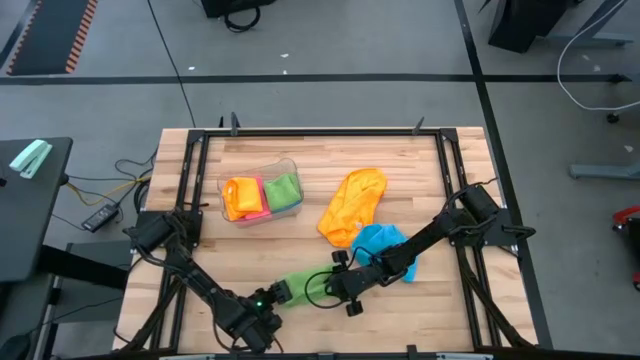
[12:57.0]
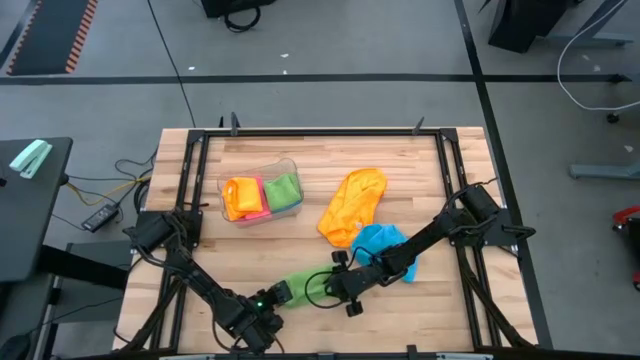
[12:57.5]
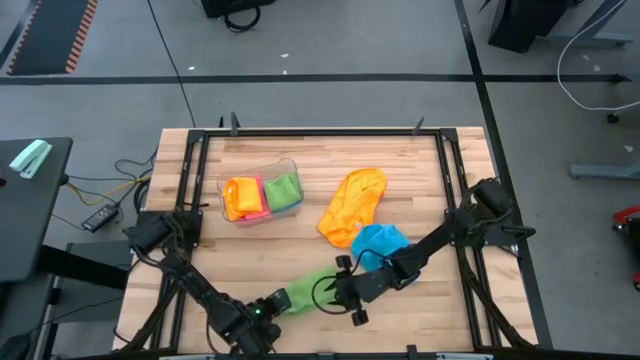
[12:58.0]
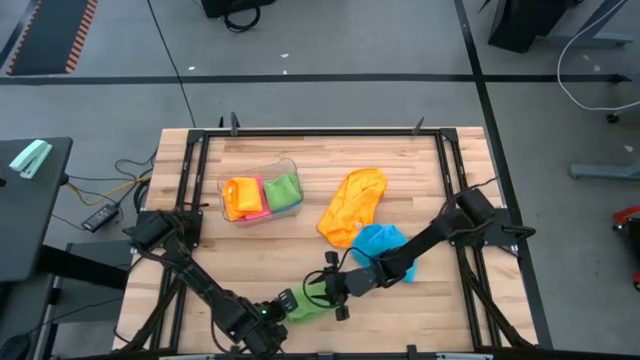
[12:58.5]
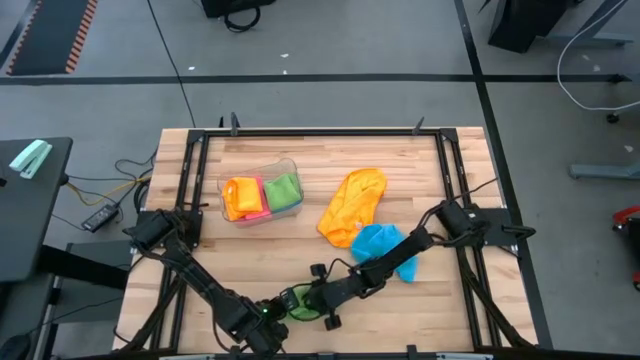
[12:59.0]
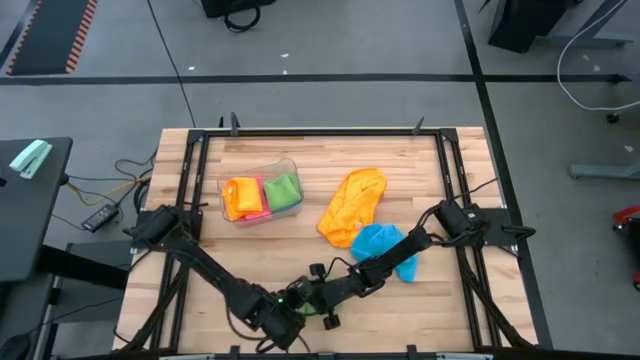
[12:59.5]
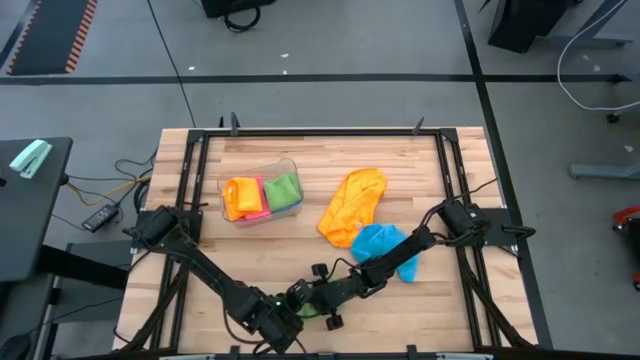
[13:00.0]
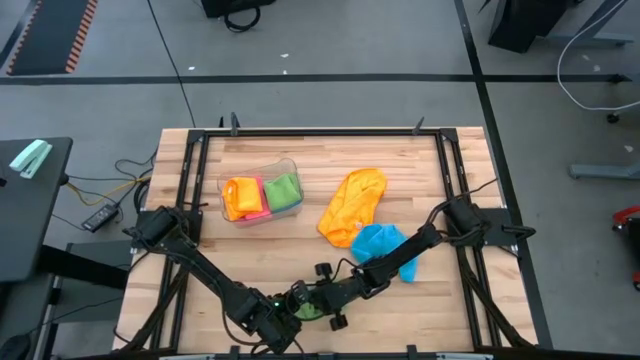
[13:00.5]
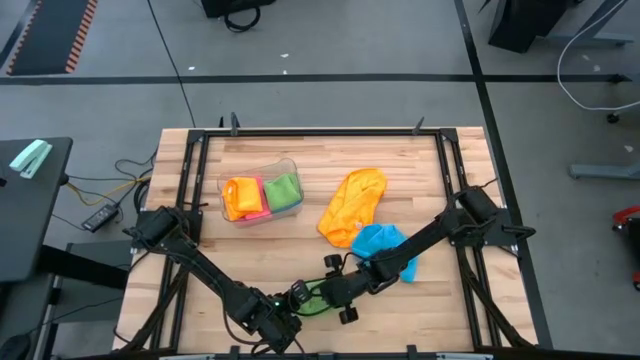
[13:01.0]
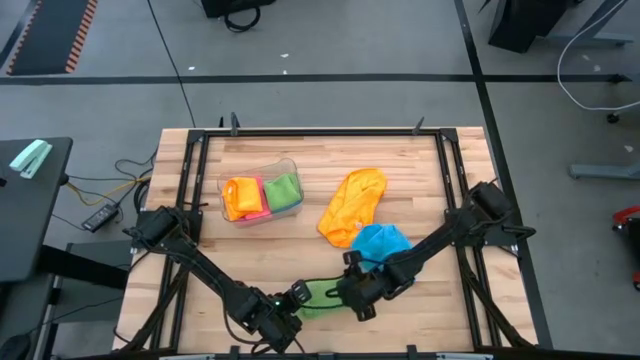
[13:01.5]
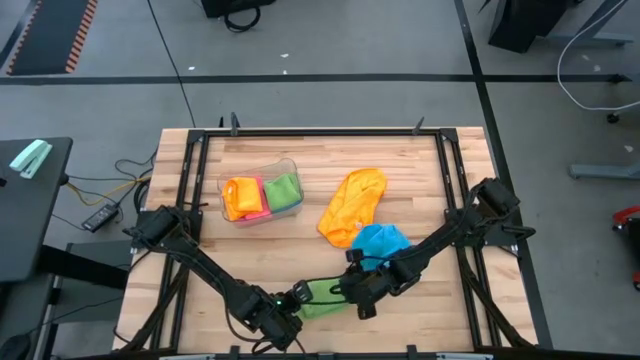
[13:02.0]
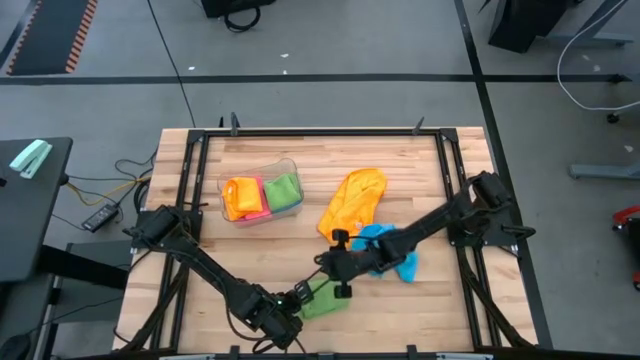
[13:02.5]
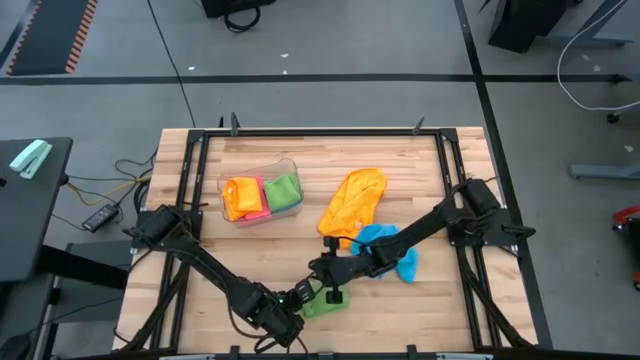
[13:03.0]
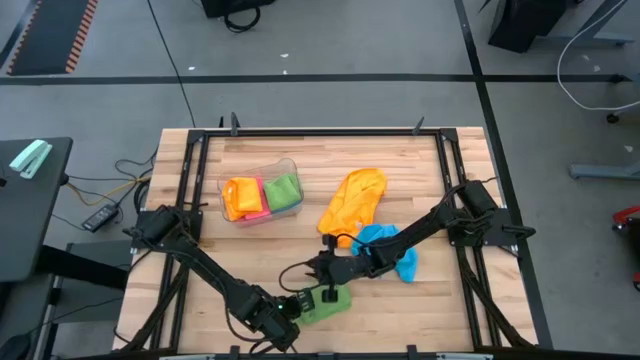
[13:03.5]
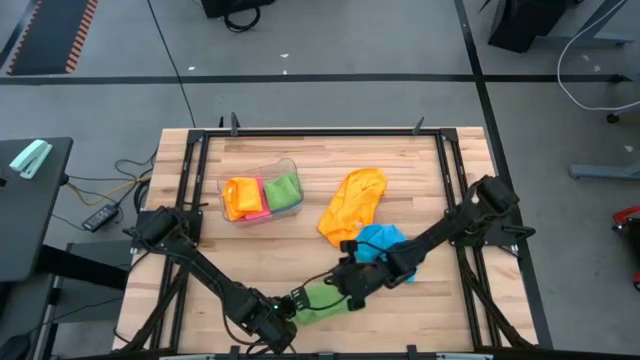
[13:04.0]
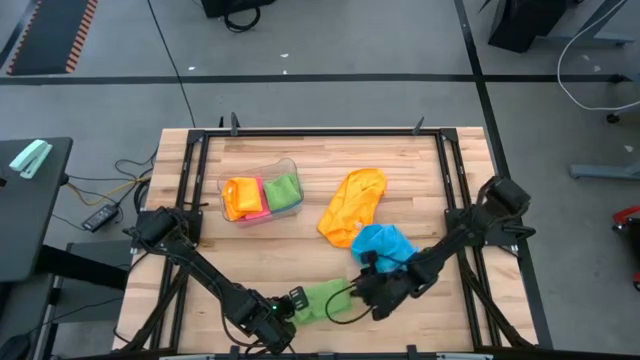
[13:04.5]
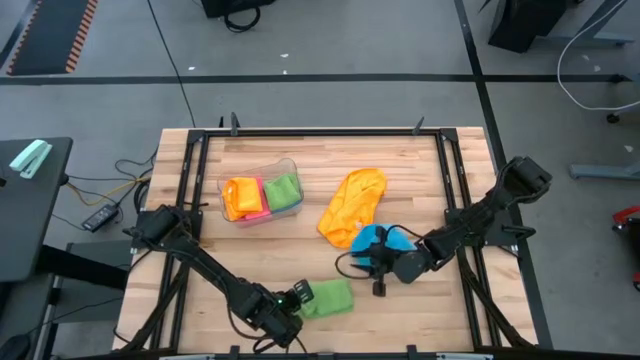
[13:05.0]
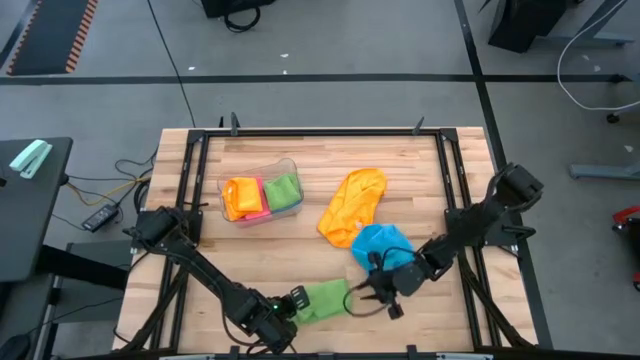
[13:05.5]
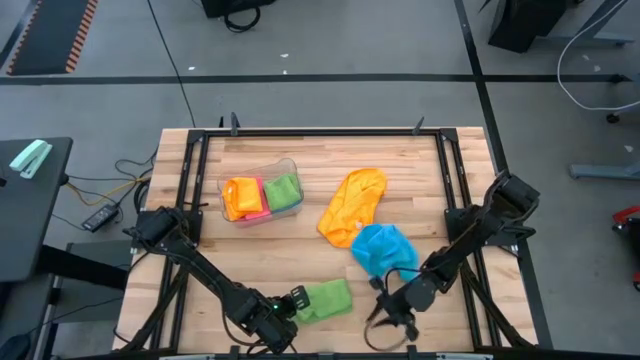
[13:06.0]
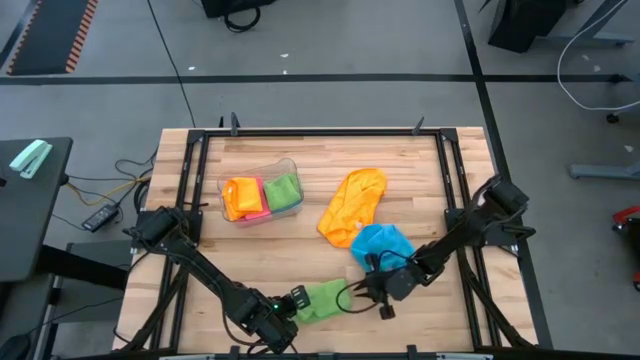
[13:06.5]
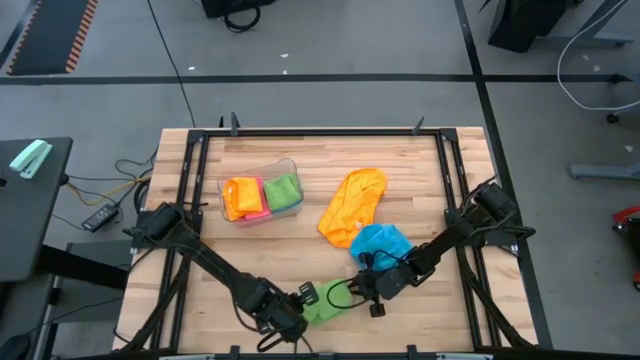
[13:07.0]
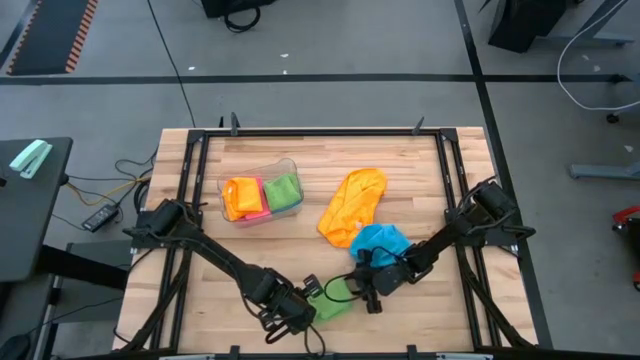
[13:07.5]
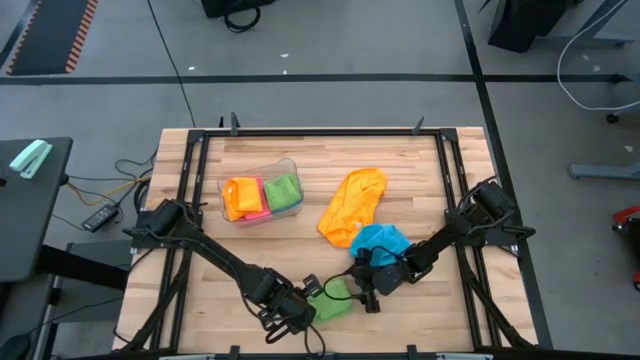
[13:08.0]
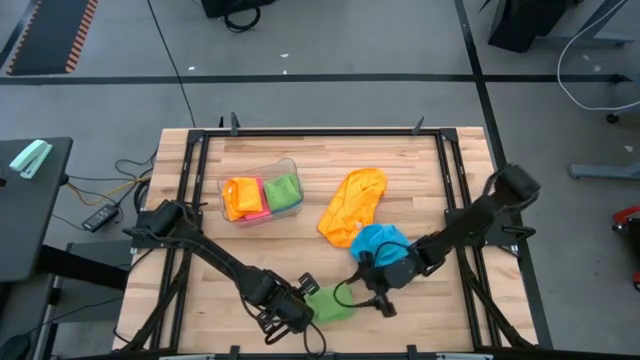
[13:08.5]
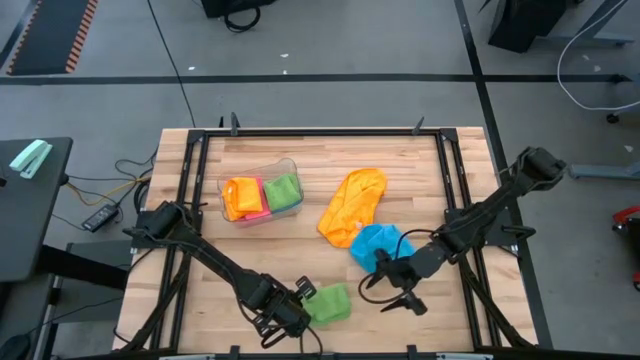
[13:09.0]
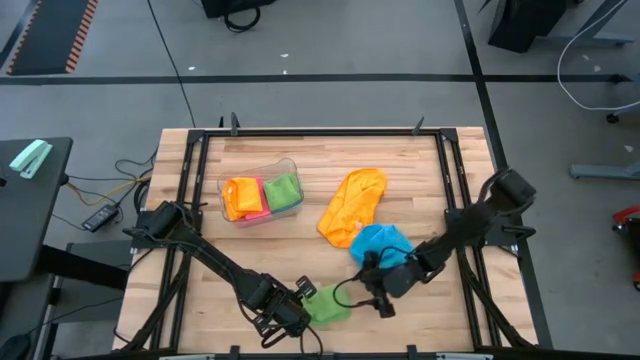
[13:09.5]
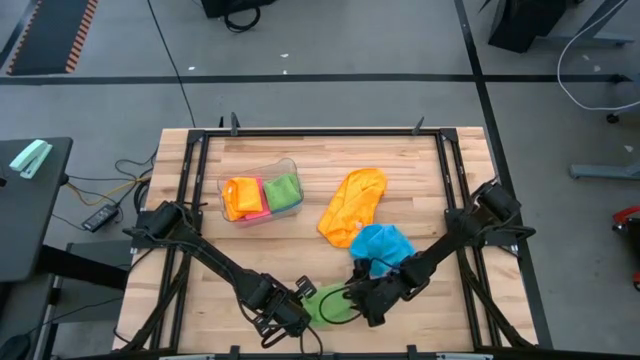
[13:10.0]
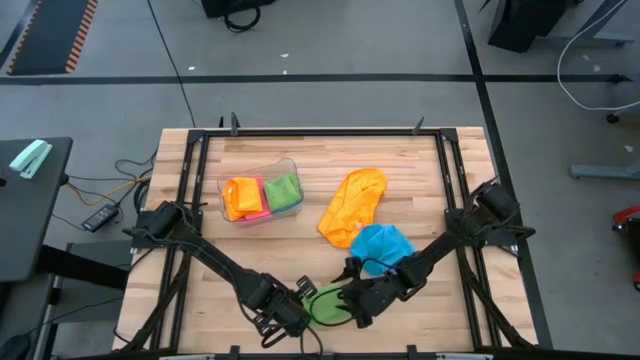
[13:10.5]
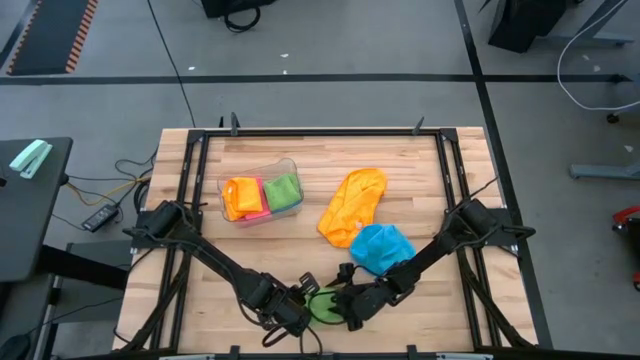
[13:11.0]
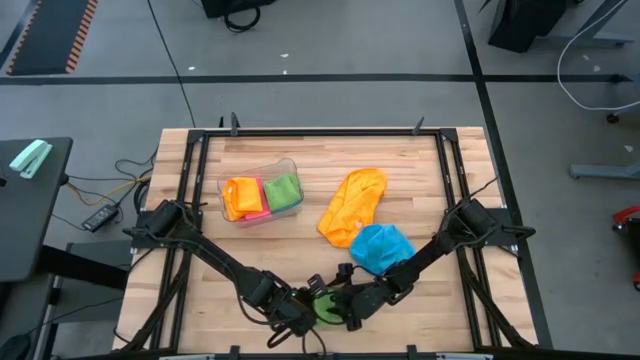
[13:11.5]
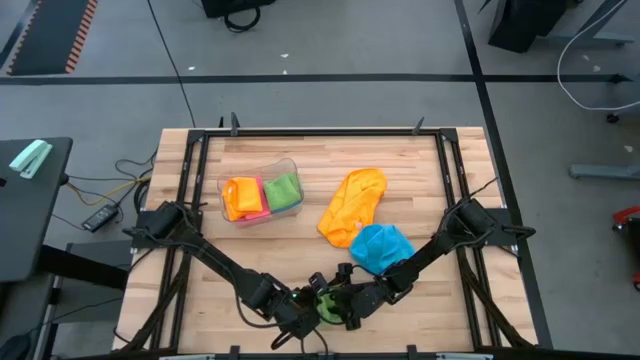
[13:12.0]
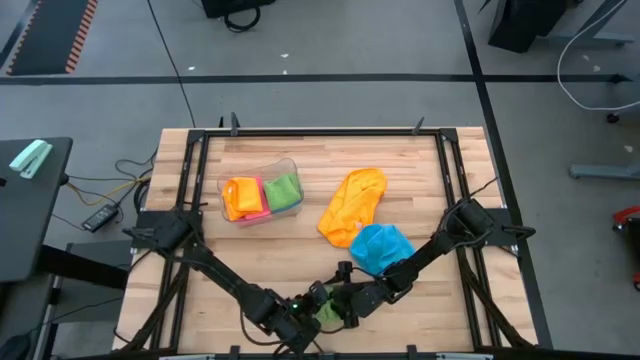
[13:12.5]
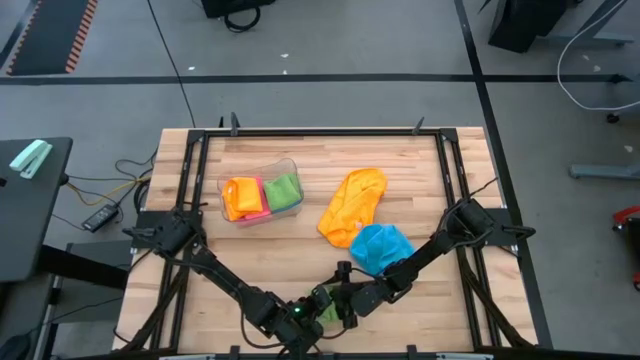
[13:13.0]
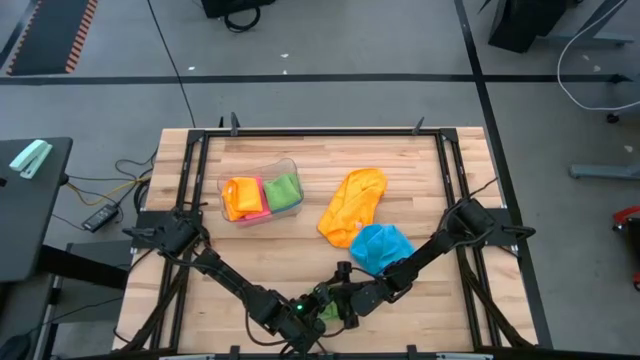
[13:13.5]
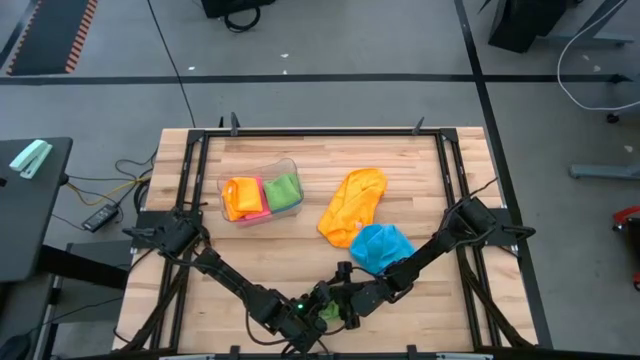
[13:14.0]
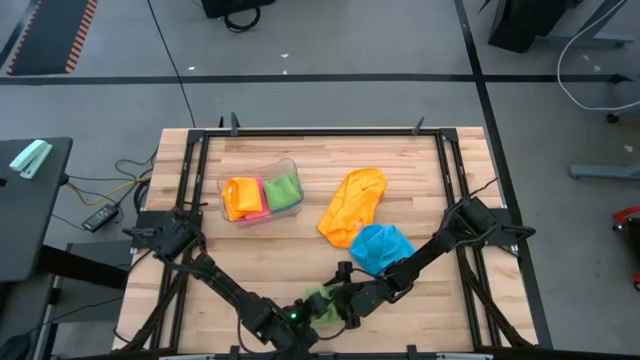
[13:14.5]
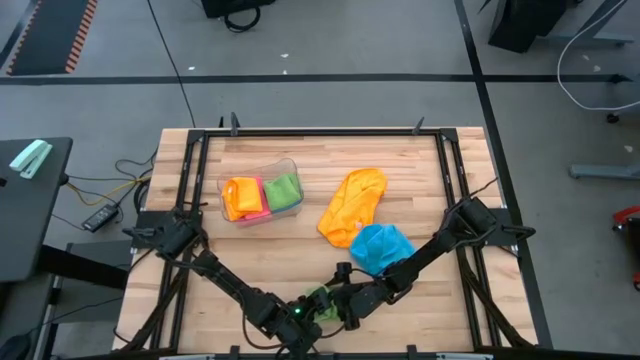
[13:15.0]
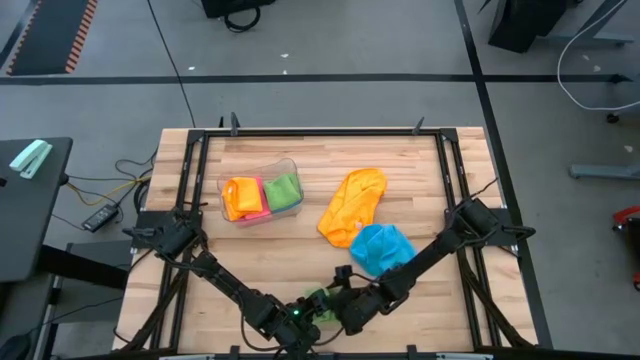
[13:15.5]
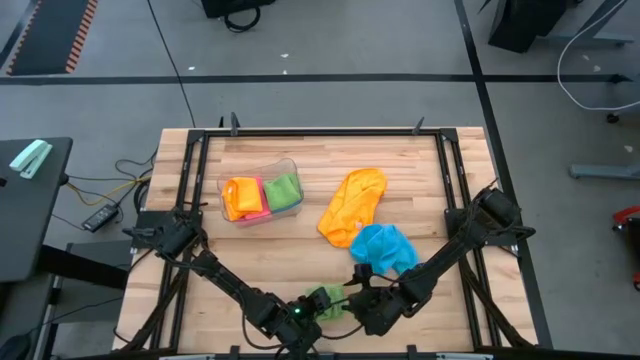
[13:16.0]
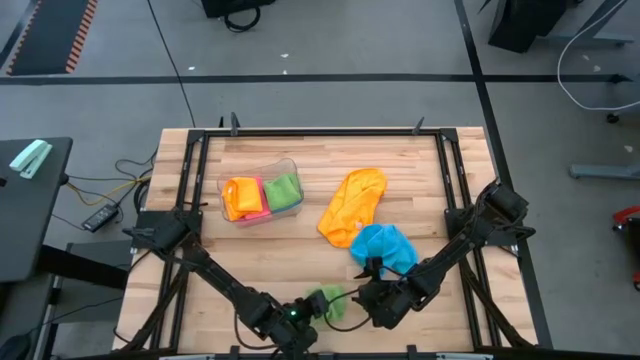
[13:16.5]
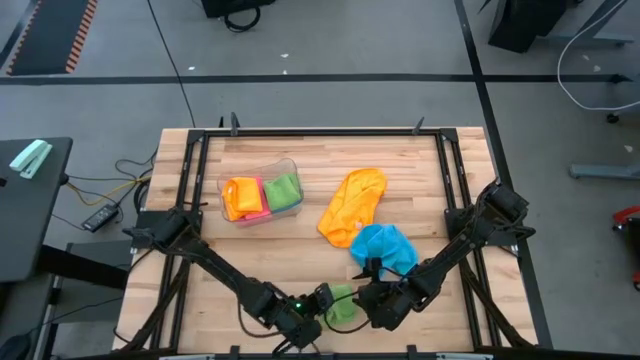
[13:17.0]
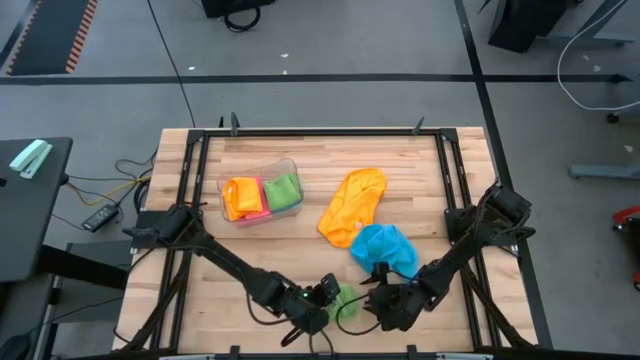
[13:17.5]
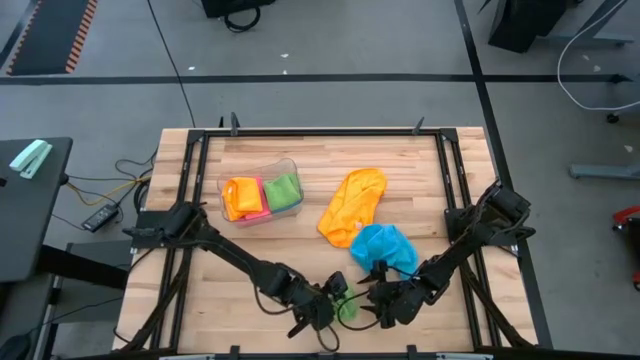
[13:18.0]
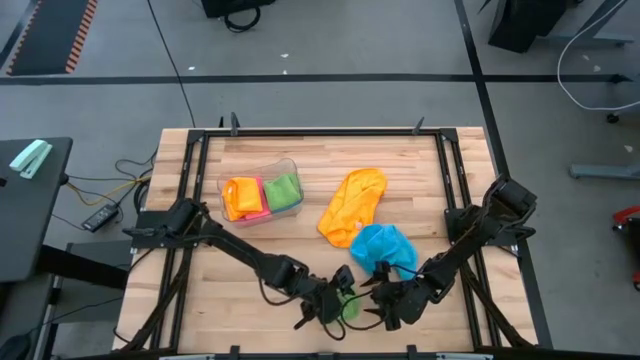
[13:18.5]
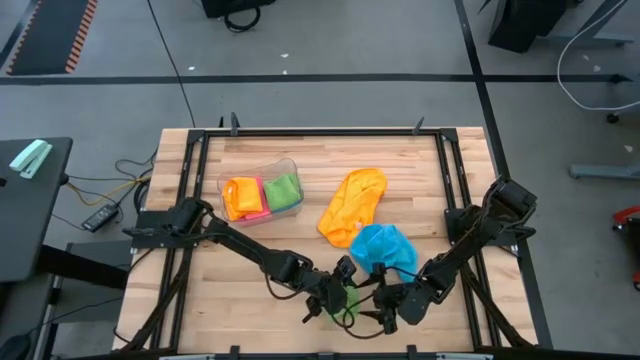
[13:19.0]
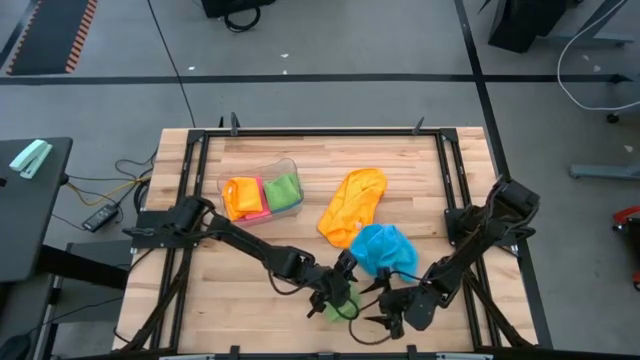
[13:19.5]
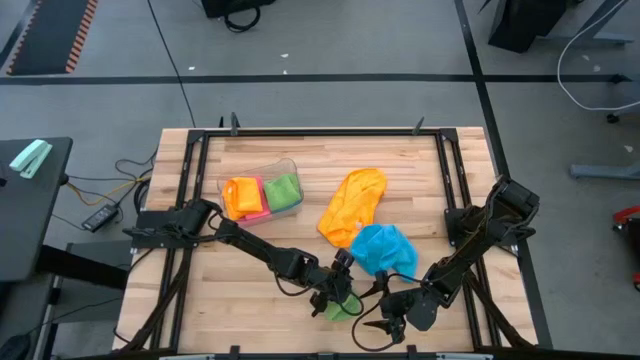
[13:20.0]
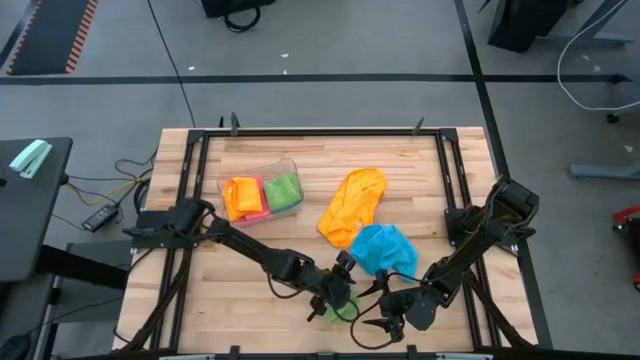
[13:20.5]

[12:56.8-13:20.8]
Task: Fold microfiber towels
Fold the green microfiber towel
